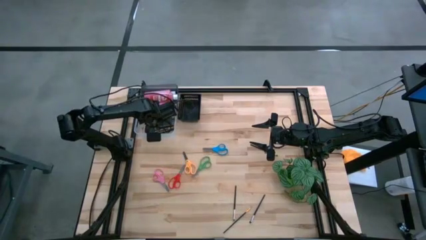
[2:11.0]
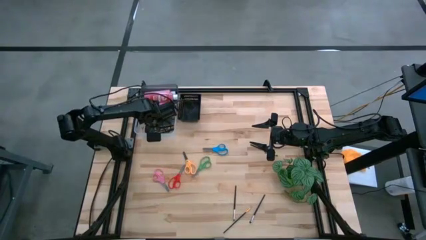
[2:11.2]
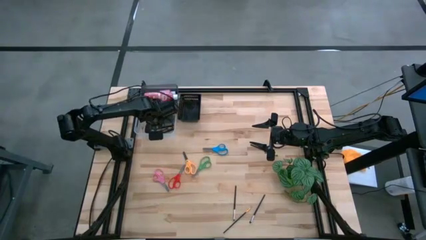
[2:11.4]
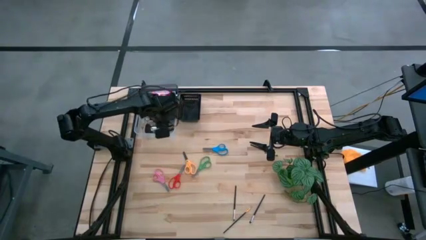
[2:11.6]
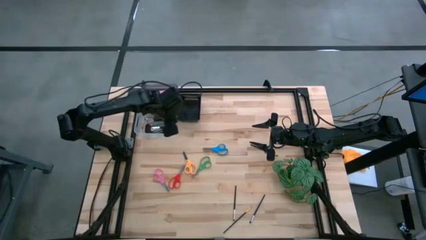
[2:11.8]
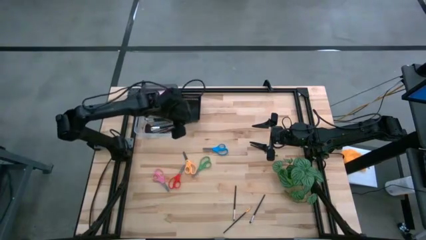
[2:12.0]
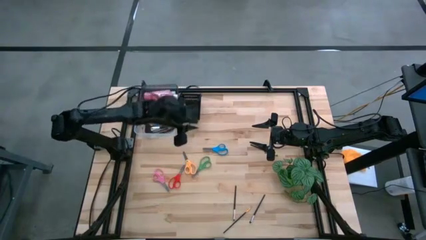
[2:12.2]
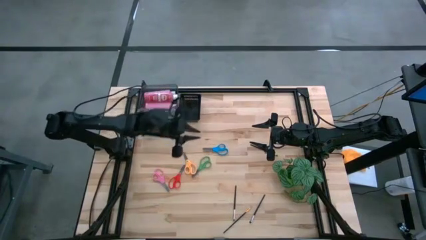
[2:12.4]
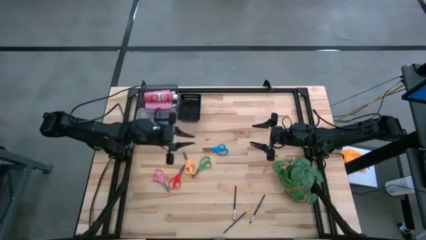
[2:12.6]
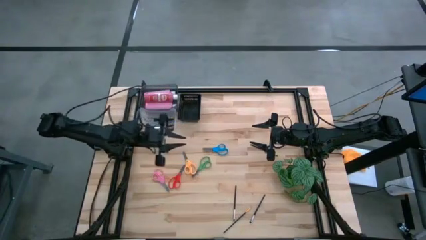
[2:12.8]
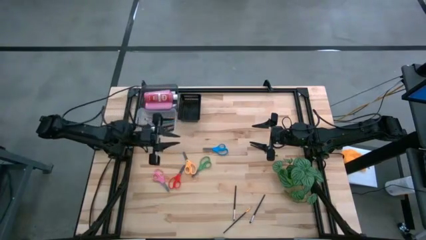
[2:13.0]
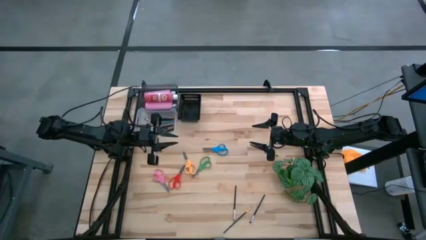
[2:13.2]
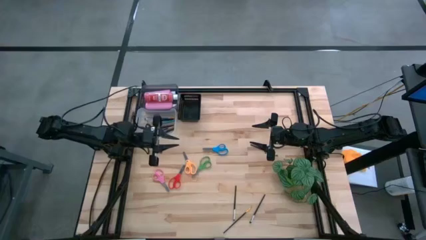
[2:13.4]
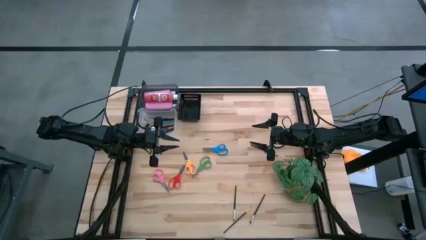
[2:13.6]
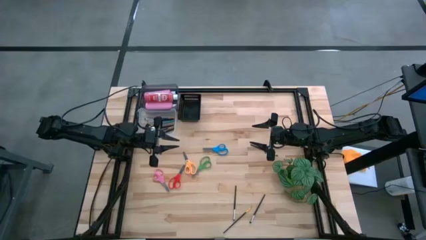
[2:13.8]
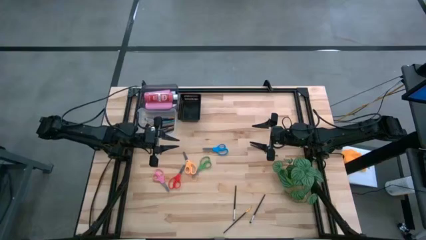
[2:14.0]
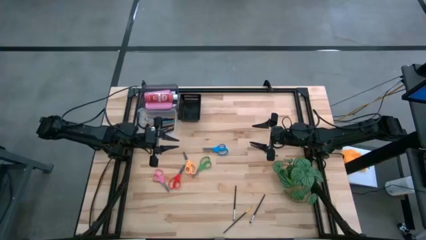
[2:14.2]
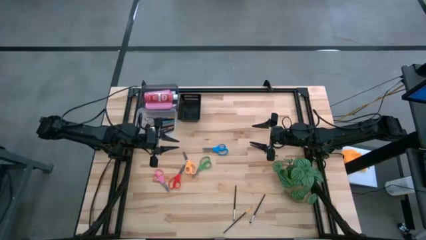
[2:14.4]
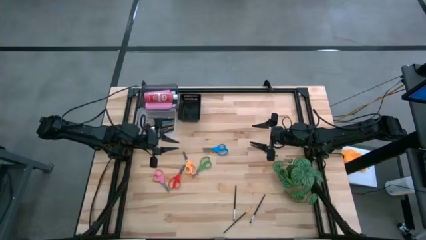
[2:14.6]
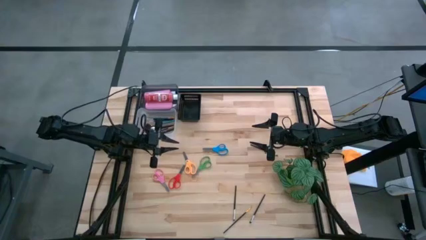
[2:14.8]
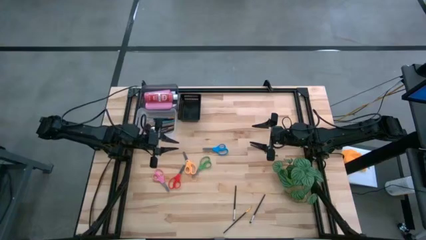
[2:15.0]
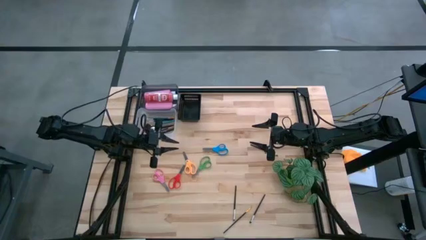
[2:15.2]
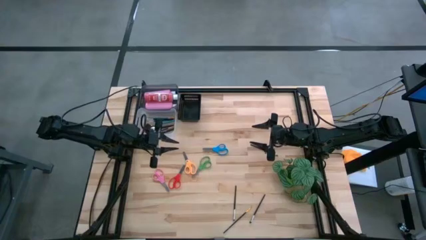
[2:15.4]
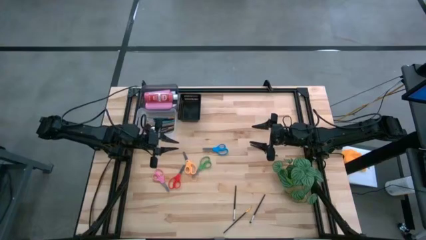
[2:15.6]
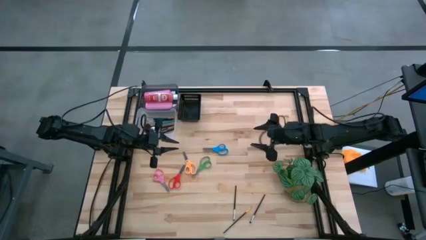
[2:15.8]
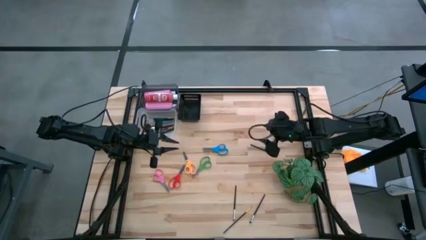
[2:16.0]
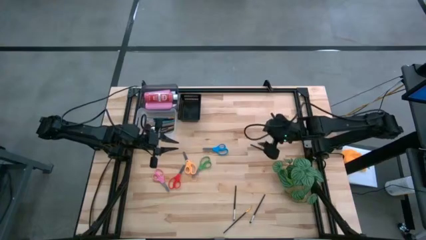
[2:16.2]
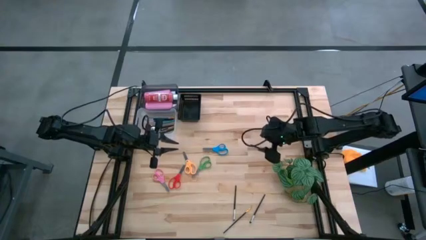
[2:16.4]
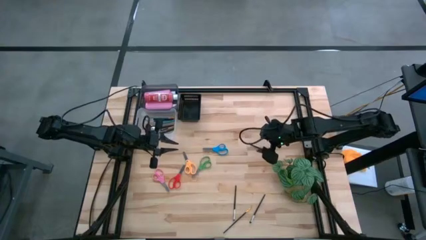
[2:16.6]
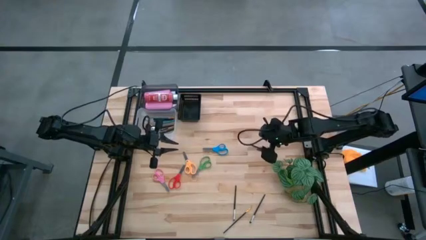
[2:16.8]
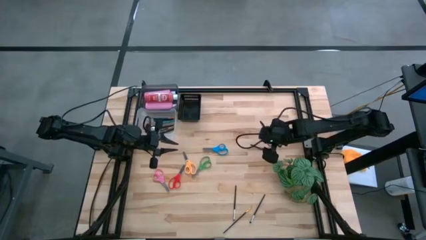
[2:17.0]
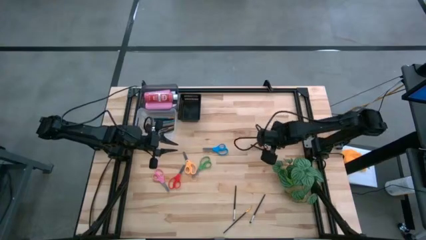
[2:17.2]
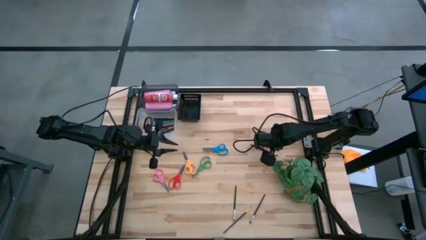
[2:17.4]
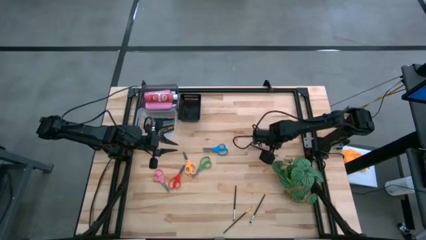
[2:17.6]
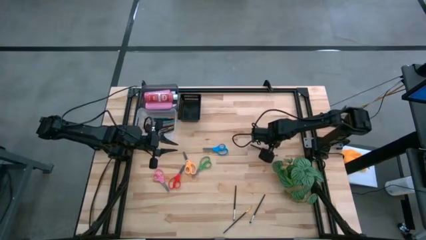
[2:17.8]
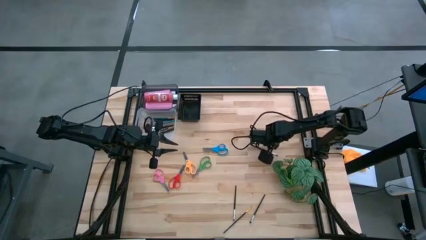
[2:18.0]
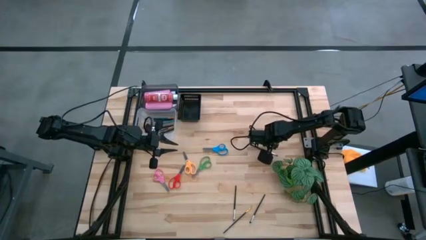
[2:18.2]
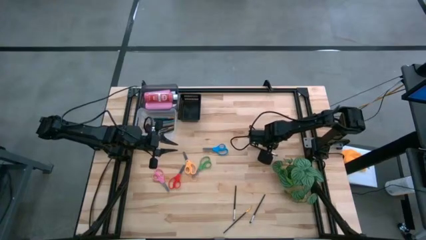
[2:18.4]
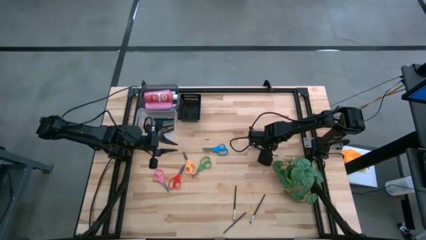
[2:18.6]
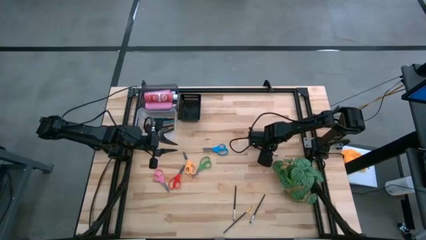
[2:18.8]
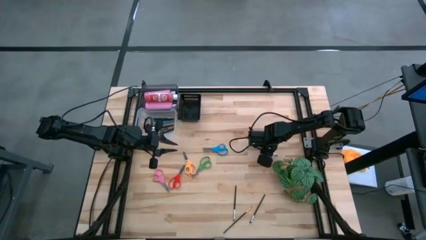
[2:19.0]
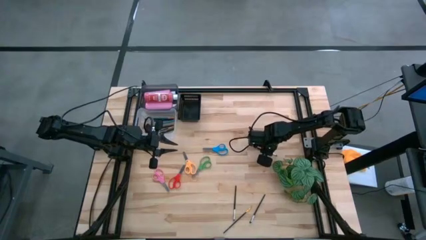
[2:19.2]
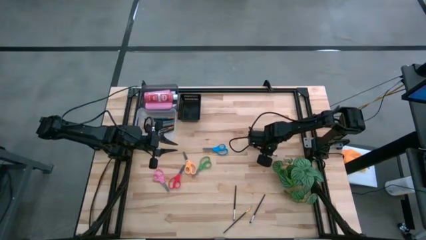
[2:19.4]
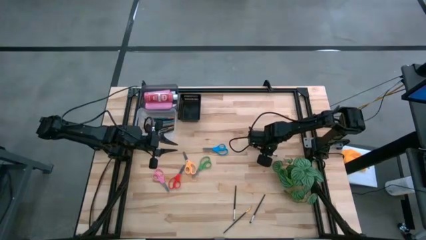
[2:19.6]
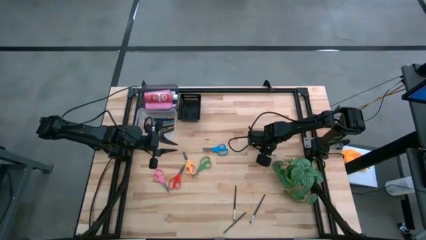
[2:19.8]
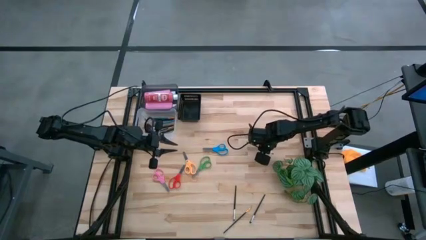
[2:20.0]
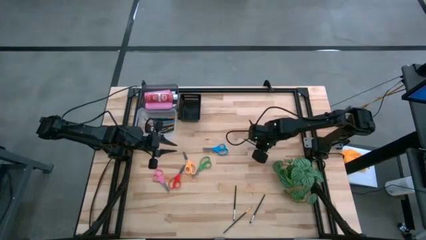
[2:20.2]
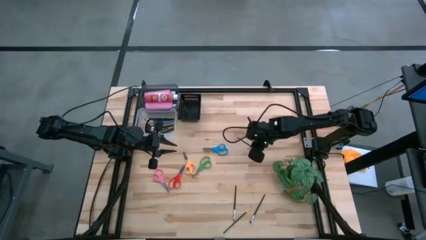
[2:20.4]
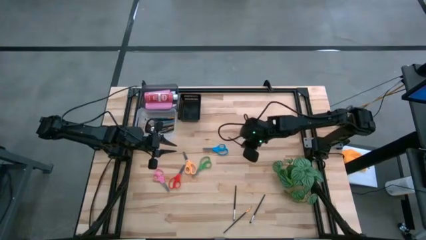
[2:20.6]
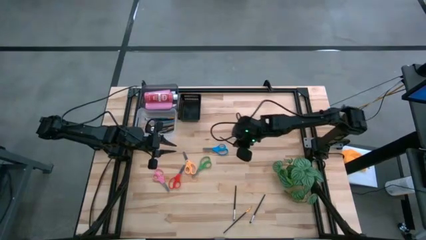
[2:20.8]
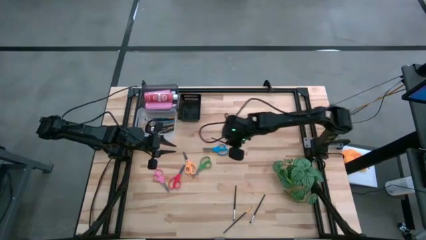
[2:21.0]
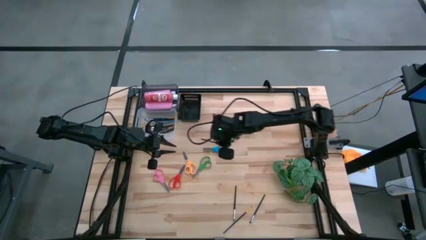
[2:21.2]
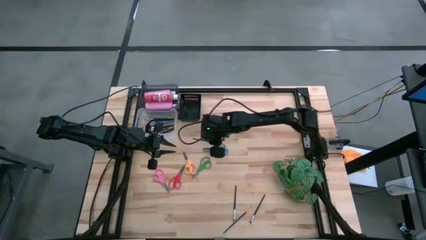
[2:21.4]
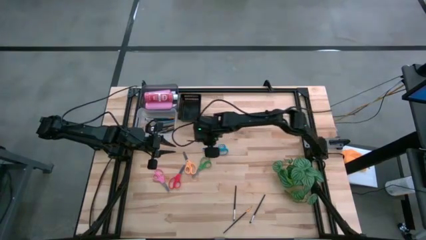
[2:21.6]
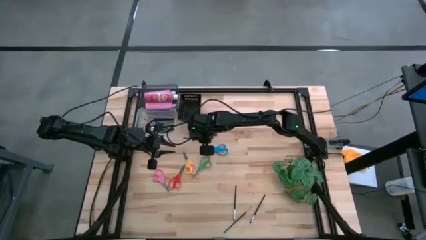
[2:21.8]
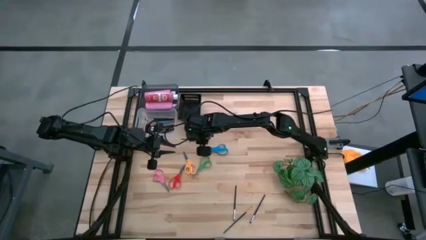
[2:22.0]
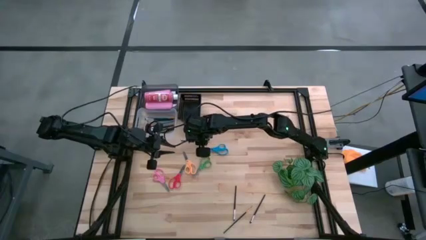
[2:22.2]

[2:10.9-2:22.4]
Task: Pick & Place Paint Supplies
Put the black paint brush into the transparent bin

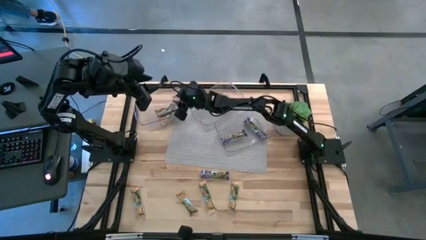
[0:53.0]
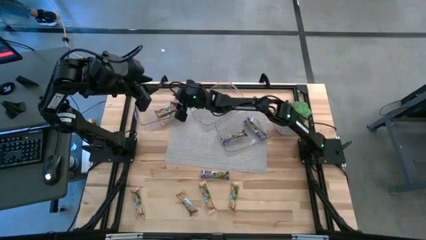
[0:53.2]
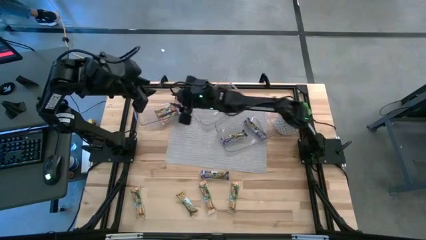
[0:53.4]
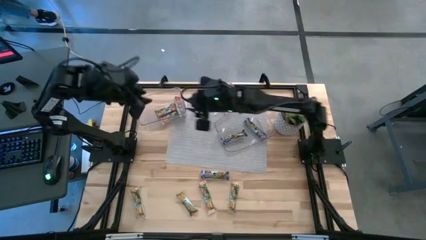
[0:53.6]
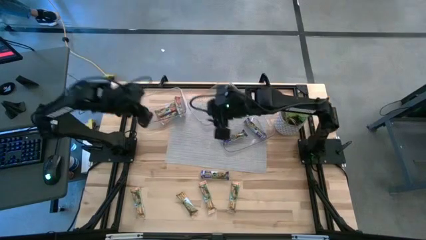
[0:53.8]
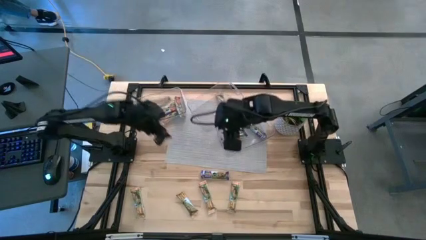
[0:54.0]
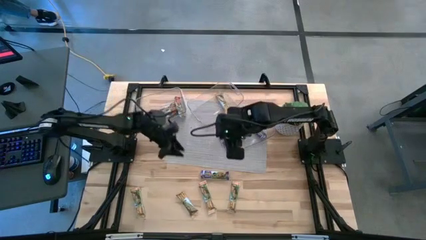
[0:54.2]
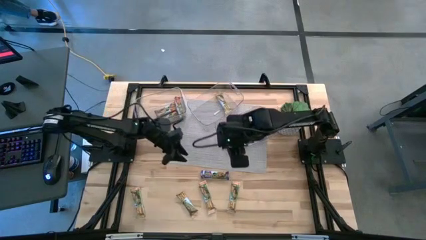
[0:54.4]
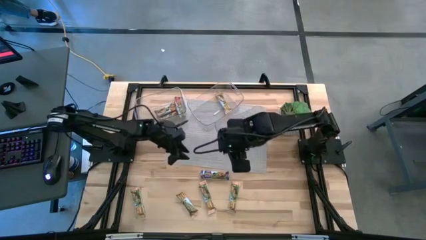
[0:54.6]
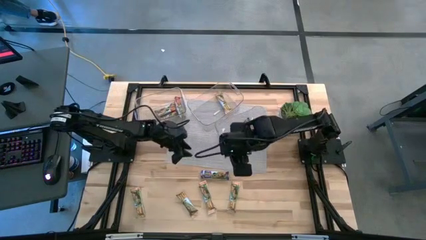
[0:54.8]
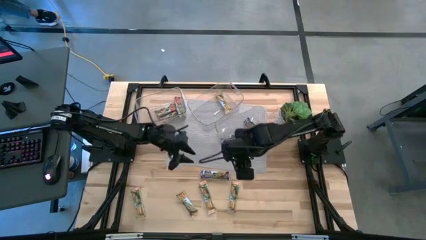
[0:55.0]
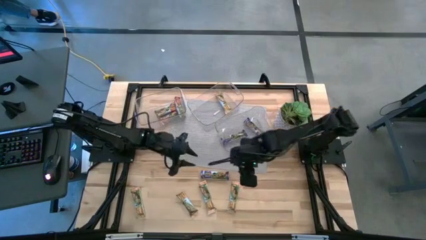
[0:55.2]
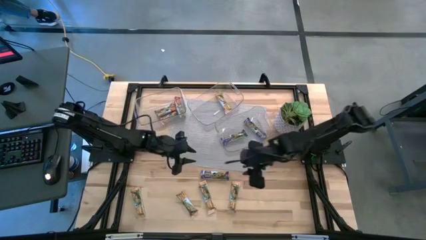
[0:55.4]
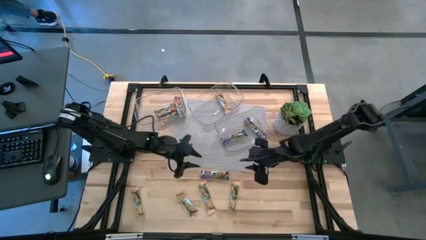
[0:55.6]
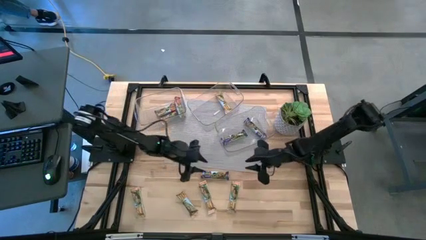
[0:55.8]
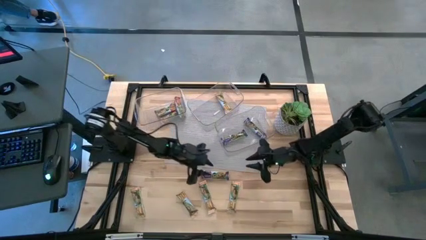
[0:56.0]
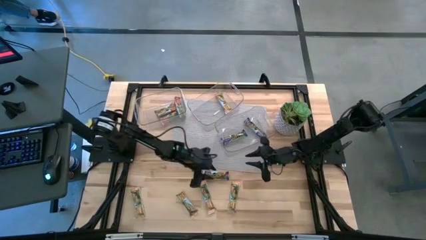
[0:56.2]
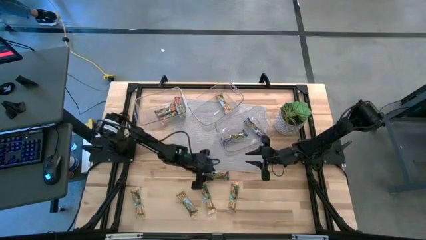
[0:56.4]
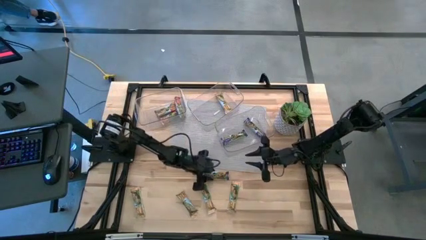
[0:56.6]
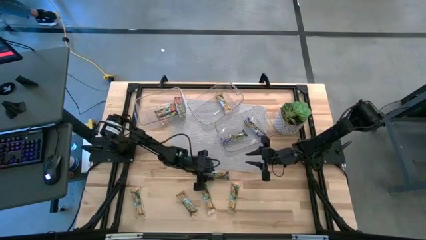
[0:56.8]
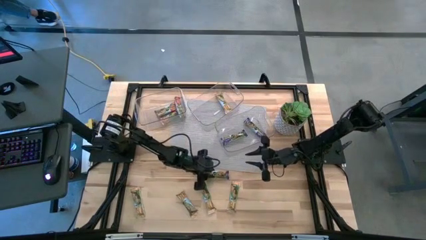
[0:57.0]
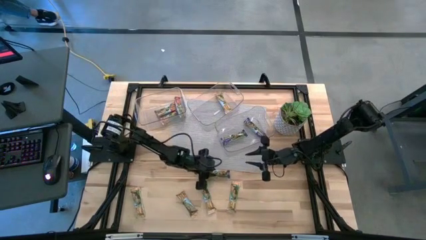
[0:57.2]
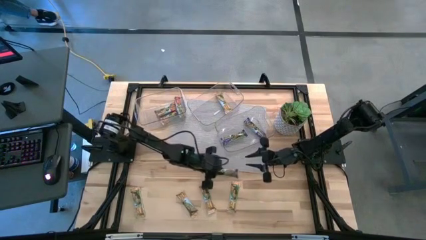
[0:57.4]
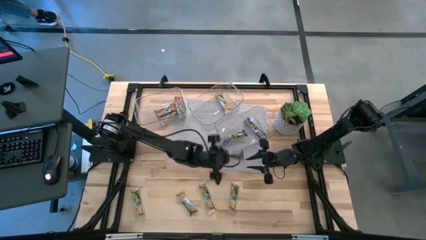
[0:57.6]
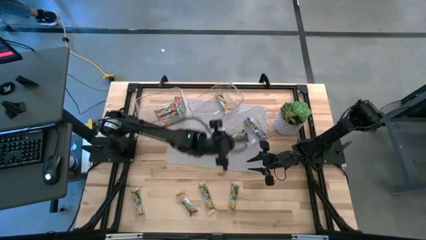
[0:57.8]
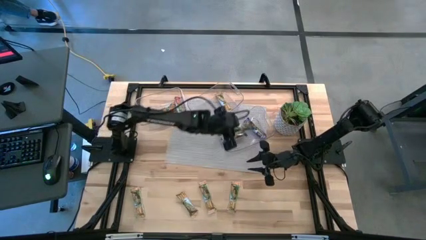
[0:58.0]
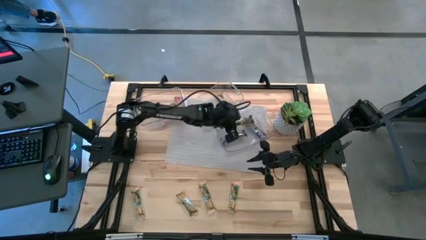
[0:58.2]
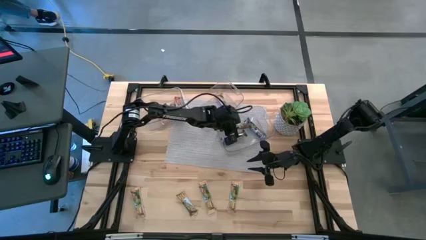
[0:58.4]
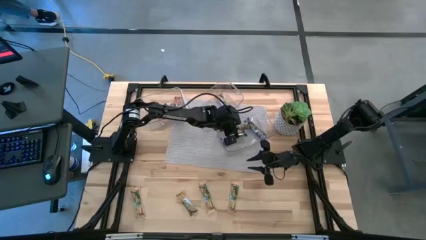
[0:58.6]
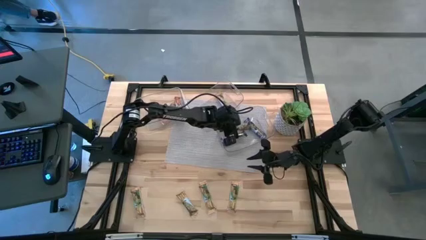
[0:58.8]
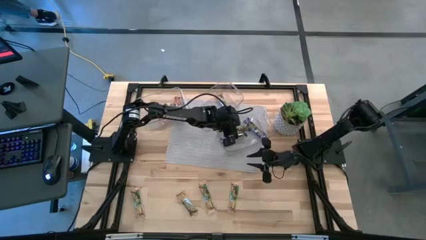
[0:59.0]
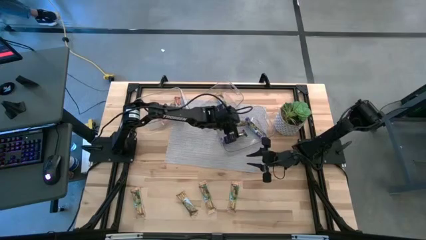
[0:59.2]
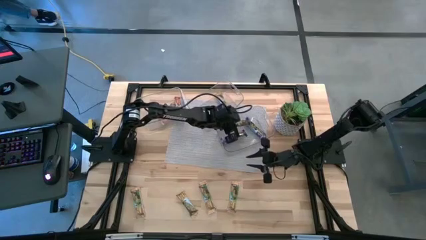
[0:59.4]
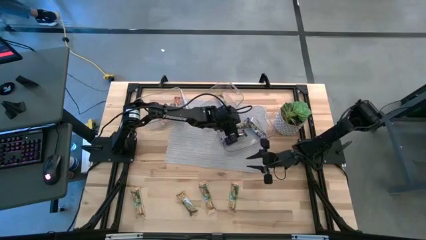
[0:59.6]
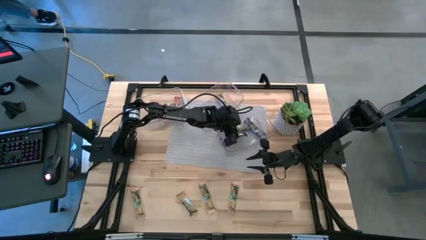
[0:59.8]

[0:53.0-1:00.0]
Task: Pick and place Granola Bars by type
Put the blue granola bar into the right transparent bin
